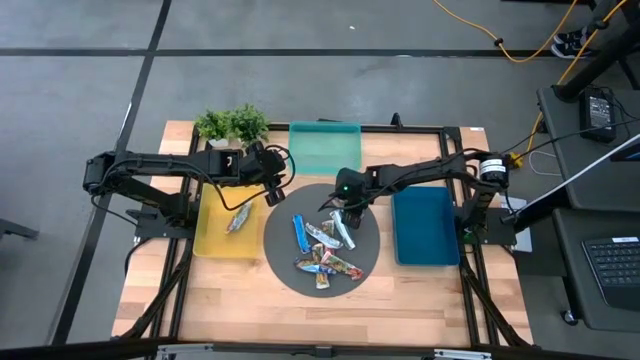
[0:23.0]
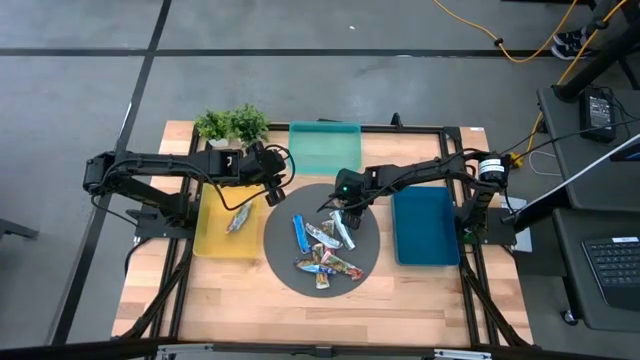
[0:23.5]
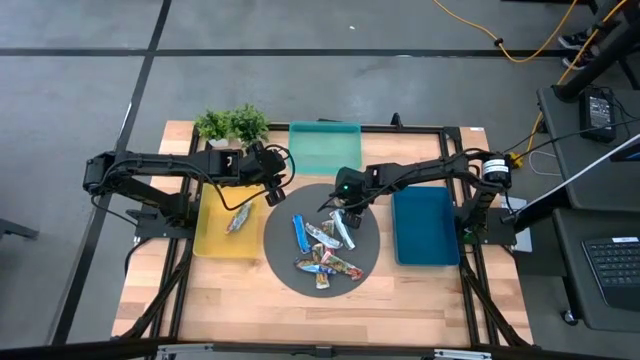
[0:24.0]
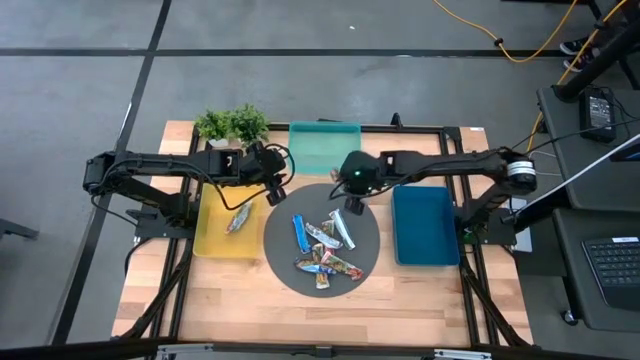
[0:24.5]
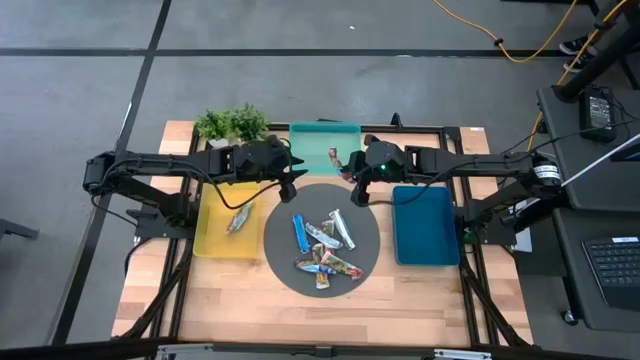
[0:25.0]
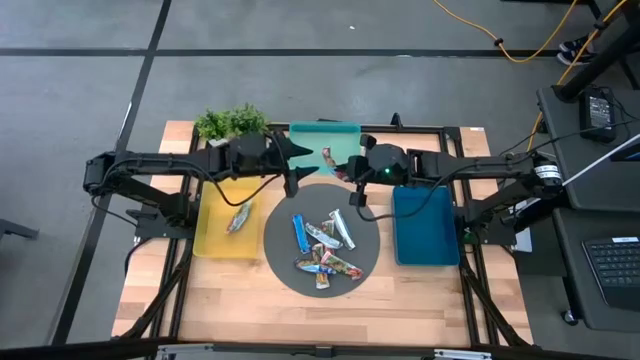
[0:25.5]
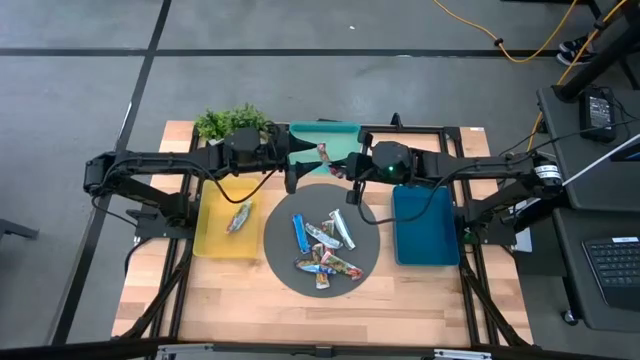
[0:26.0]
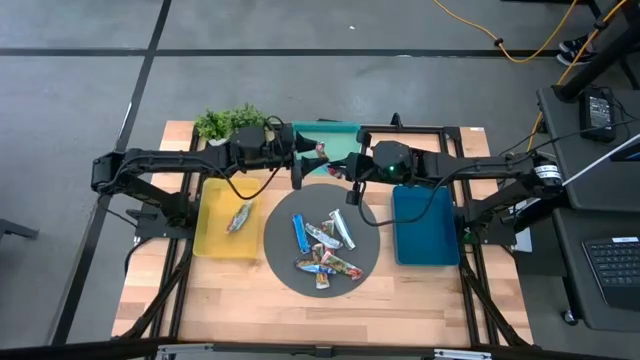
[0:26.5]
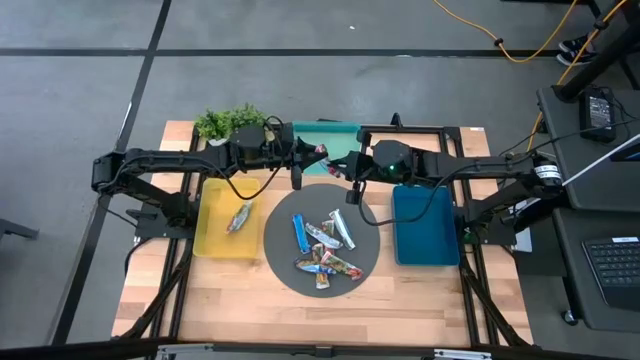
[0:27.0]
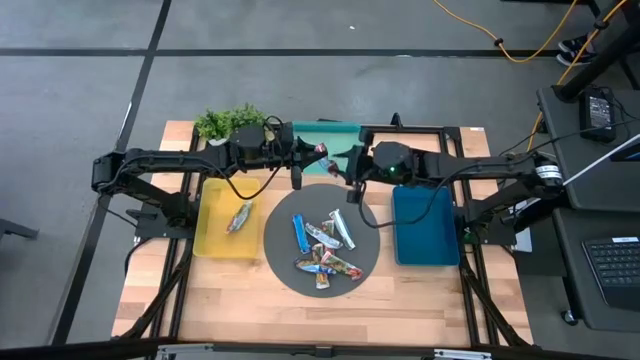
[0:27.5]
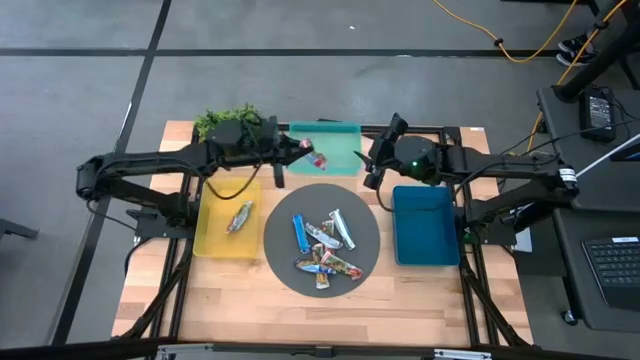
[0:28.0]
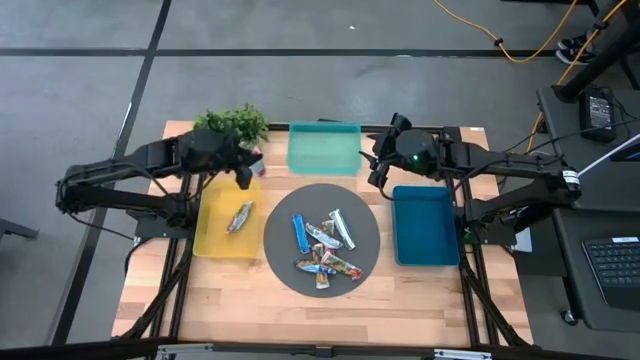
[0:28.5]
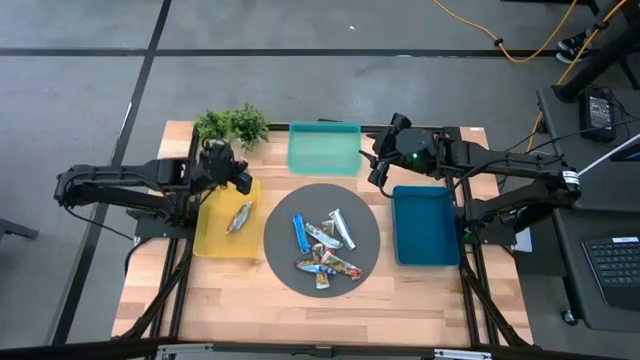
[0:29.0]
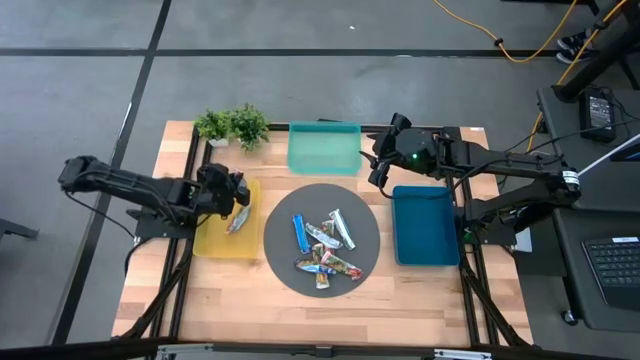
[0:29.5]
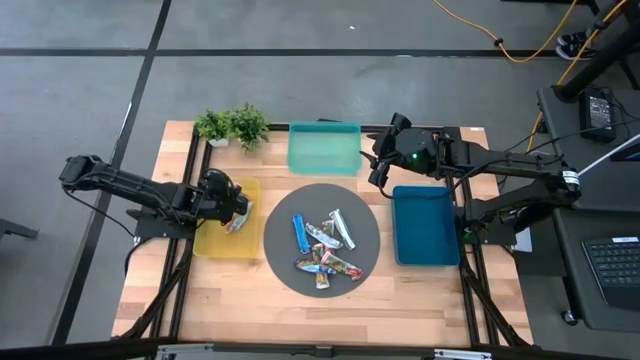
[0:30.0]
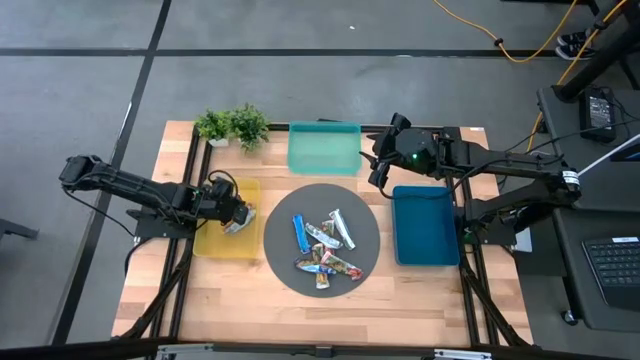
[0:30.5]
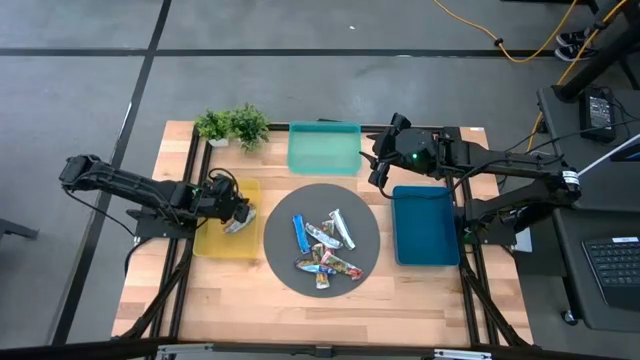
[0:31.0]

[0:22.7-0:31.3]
Task: Pick and place Granola Bars by type
Put the red granola bar into the yellow bin

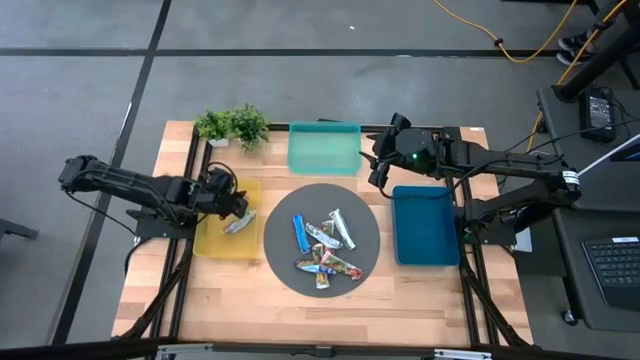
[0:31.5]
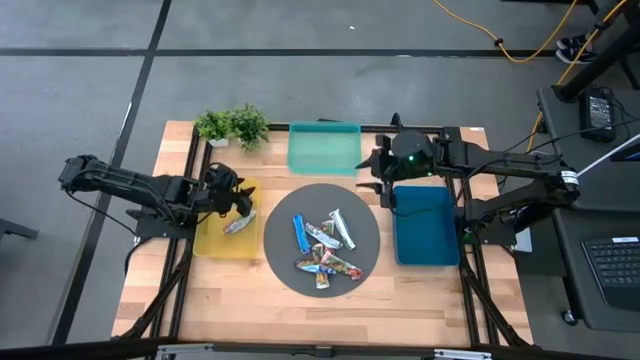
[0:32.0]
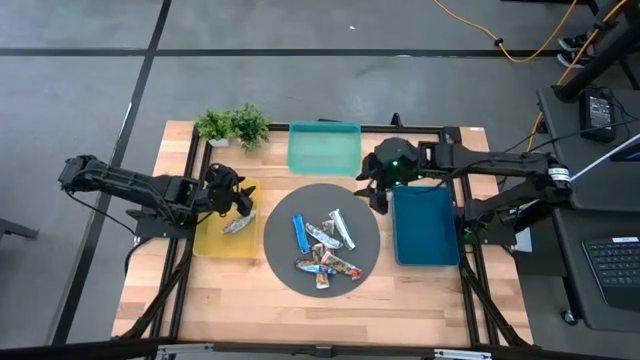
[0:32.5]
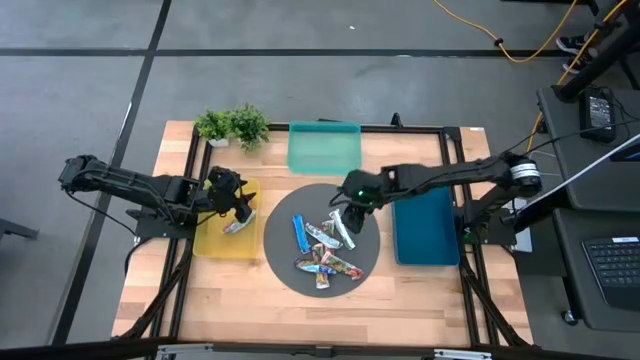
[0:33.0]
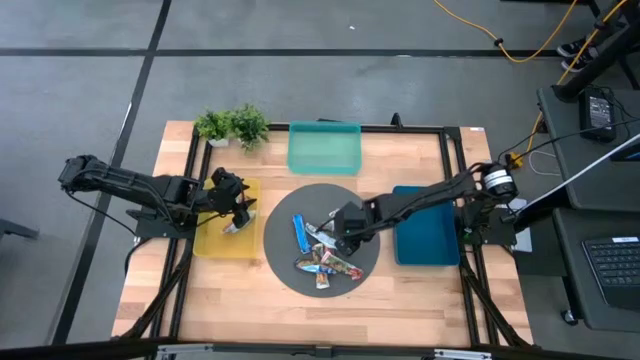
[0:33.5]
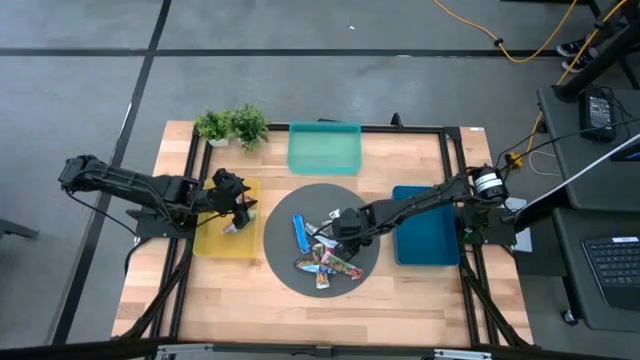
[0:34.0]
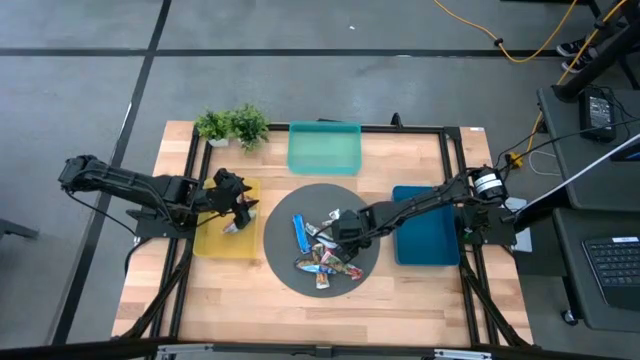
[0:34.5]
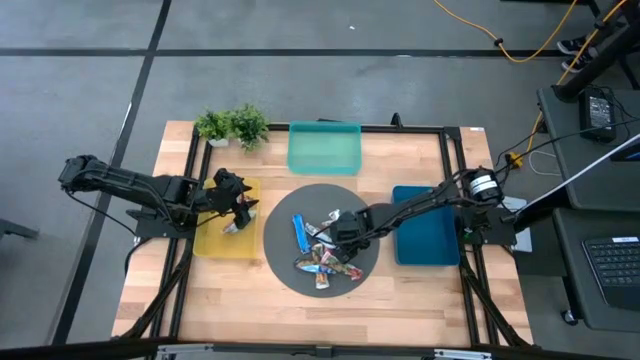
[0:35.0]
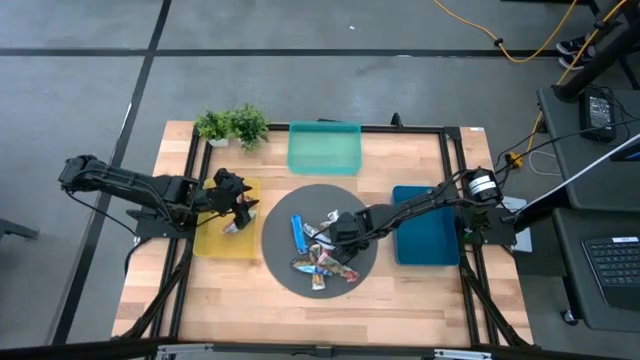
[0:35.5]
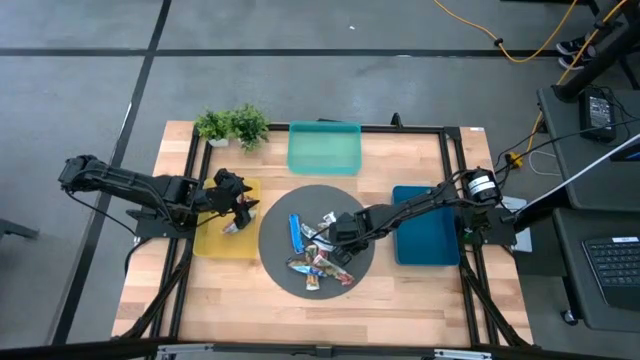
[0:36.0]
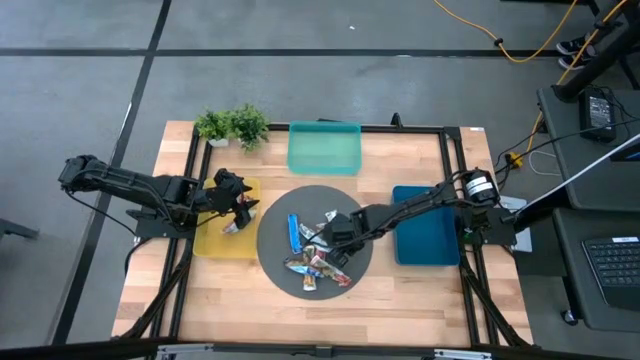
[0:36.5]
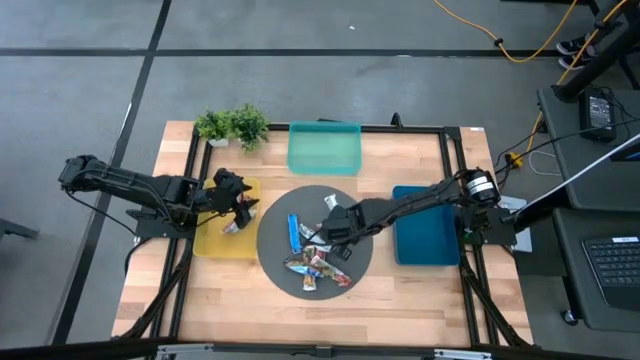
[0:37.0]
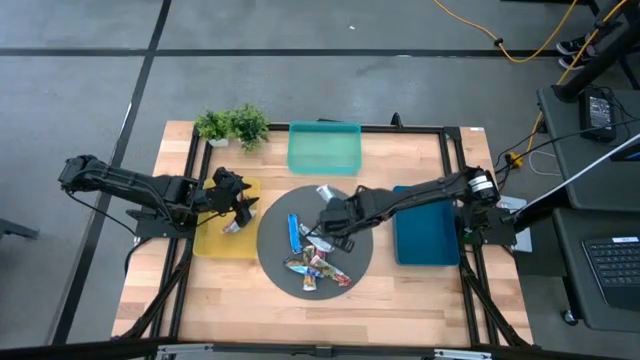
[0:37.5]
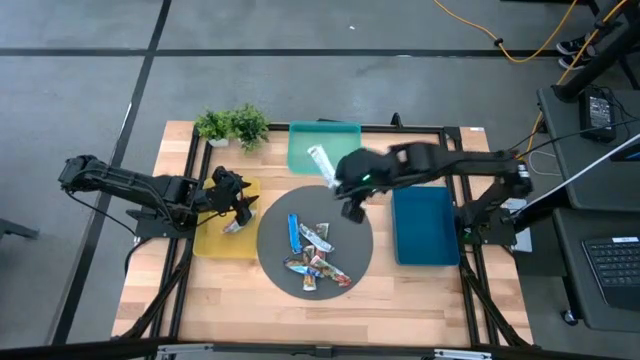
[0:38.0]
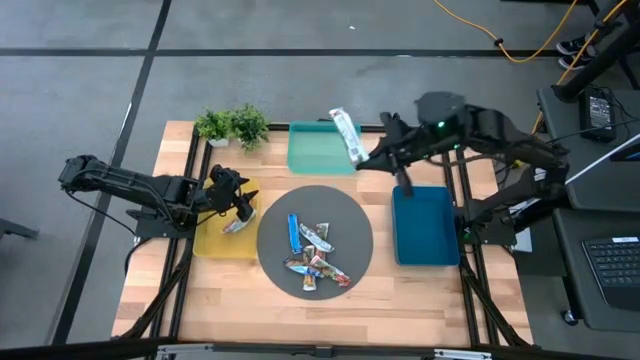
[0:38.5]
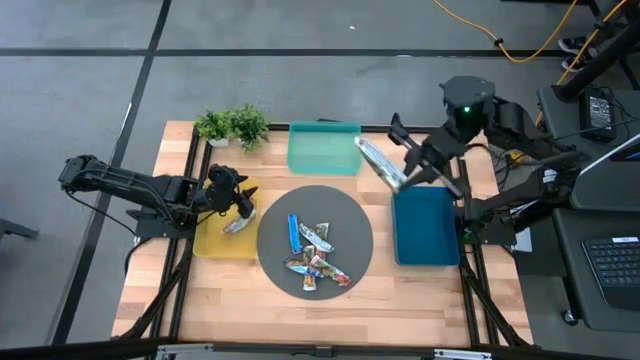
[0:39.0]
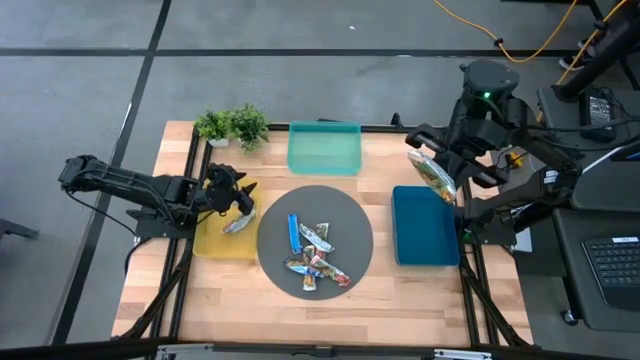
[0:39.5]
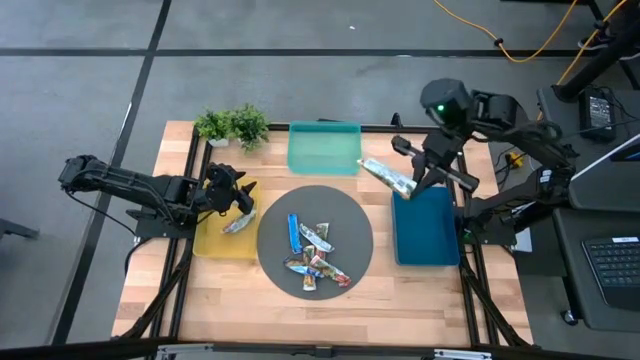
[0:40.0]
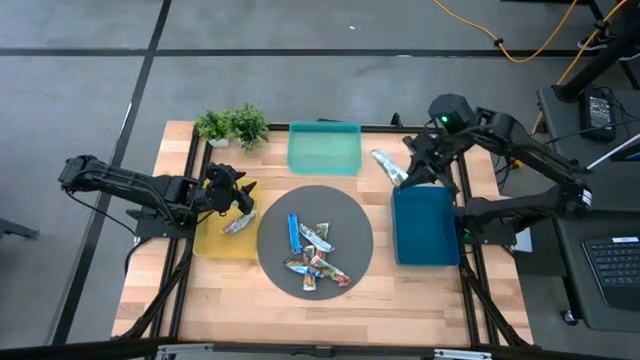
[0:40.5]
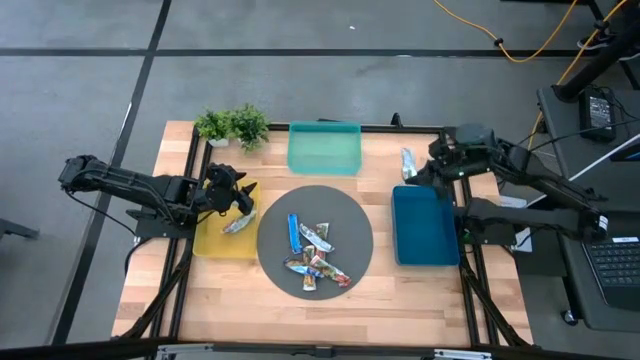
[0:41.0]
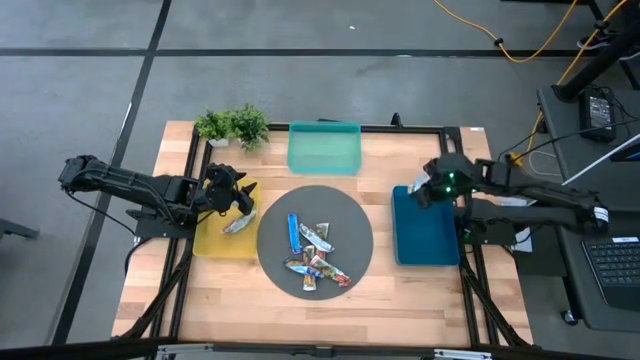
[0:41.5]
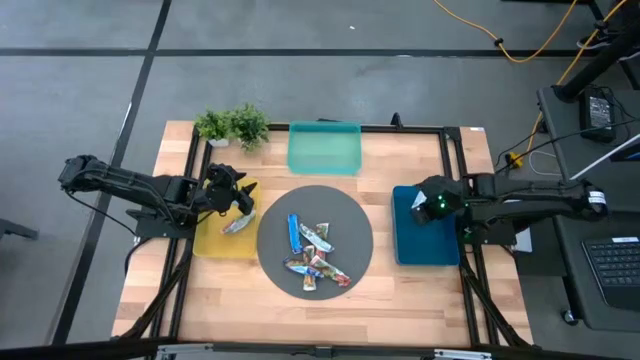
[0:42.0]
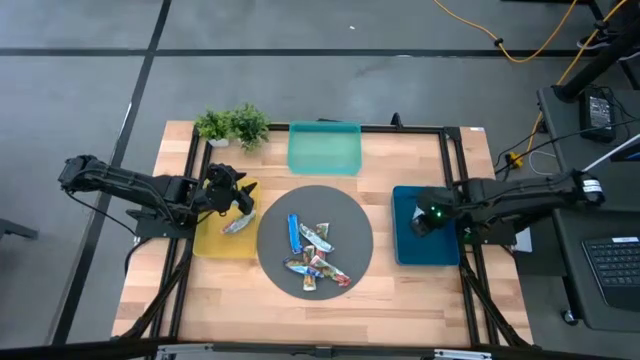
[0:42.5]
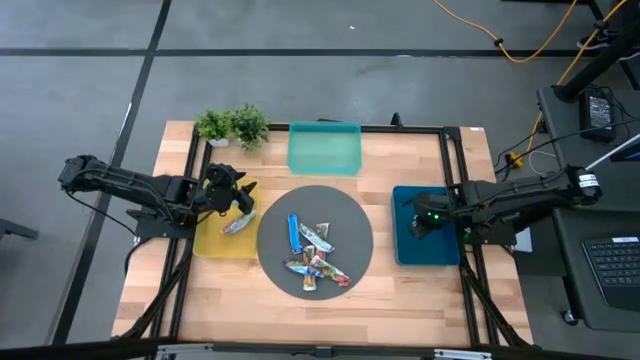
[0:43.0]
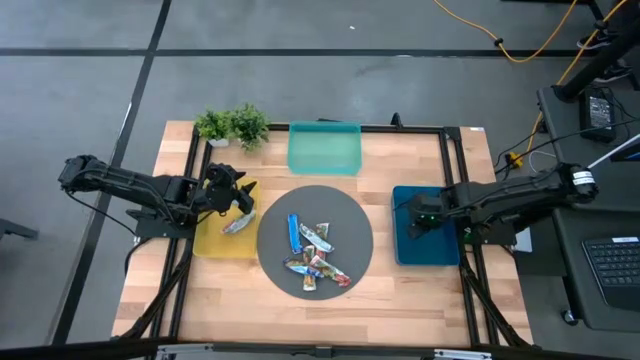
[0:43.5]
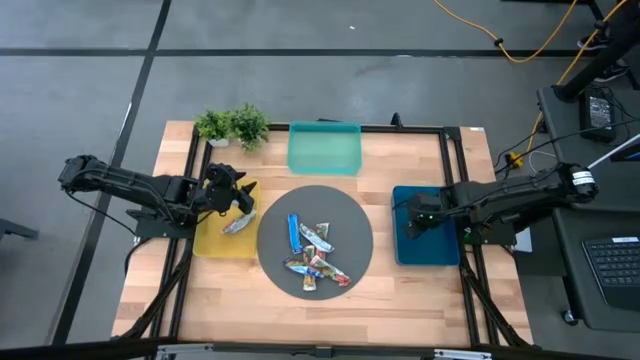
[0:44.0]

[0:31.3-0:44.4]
Put the yellow granola bar into the blue bin

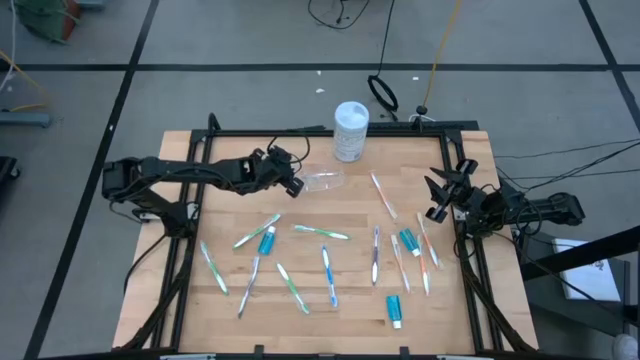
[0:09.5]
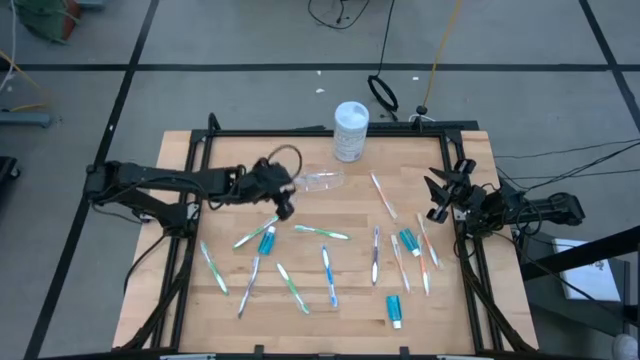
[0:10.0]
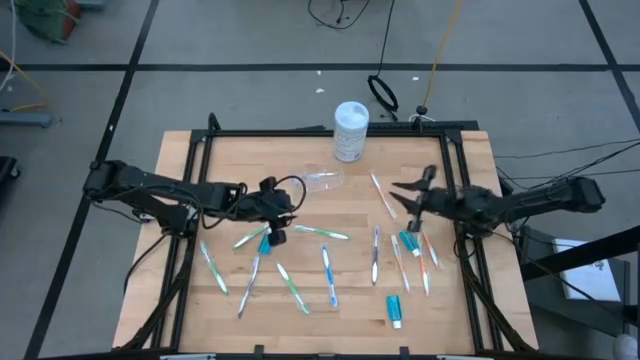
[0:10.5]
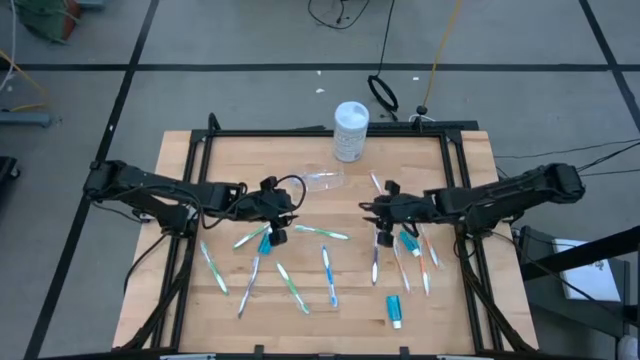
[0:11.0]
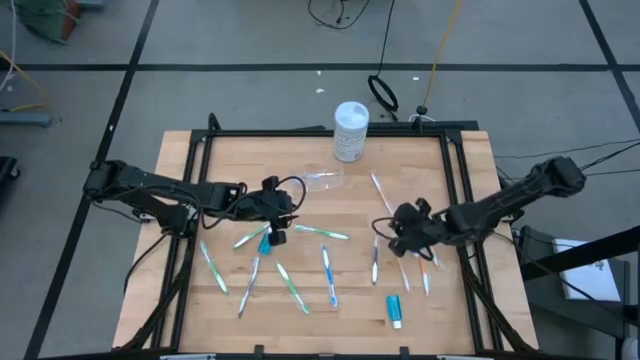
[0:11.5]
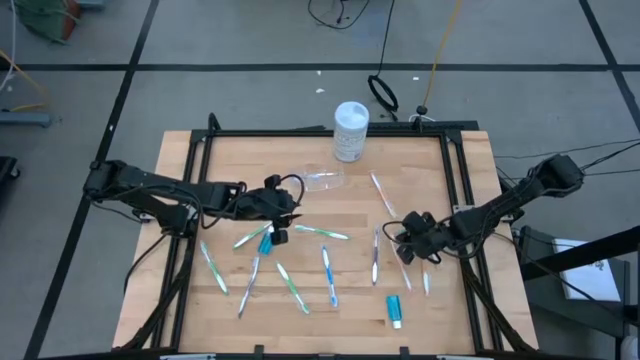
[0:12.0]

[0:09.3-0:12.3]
Task: Pick & Place toothbrushing station
Adjust the orange toothbrush on the table
